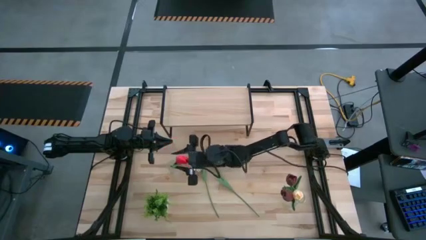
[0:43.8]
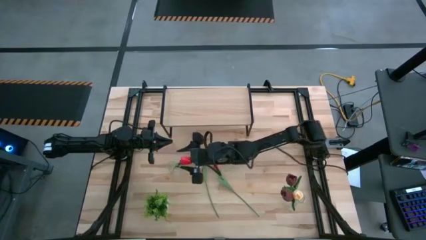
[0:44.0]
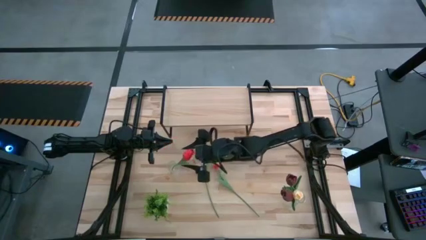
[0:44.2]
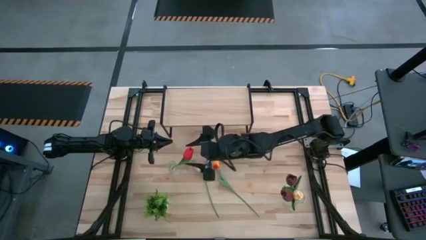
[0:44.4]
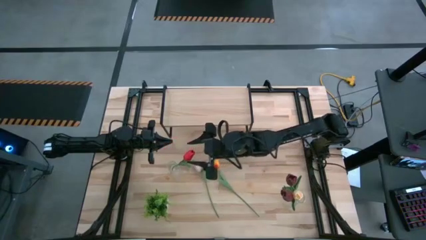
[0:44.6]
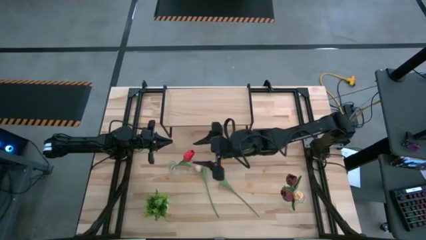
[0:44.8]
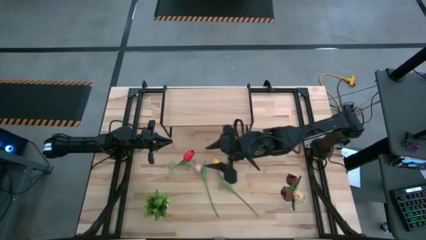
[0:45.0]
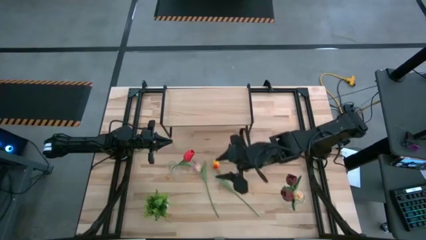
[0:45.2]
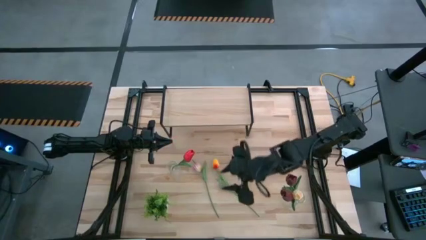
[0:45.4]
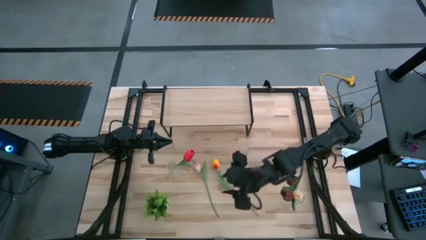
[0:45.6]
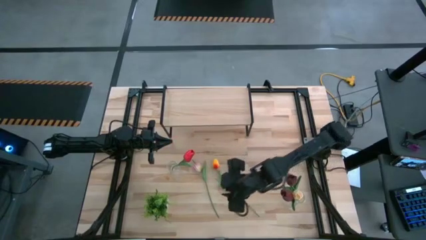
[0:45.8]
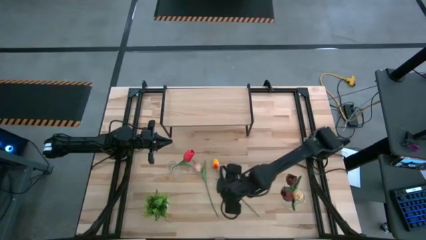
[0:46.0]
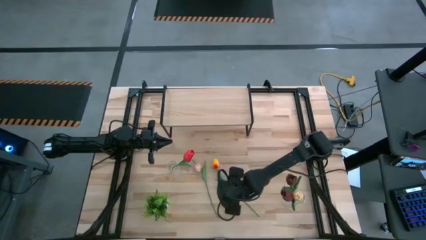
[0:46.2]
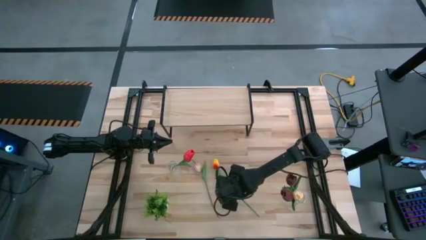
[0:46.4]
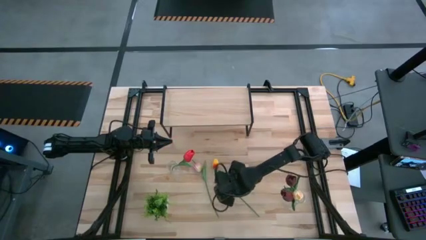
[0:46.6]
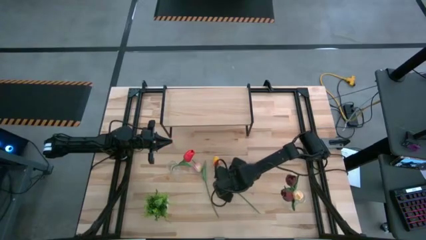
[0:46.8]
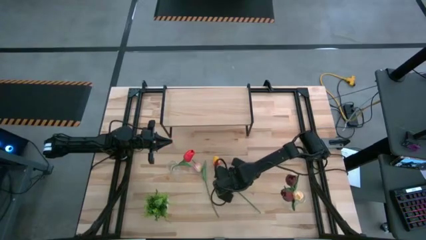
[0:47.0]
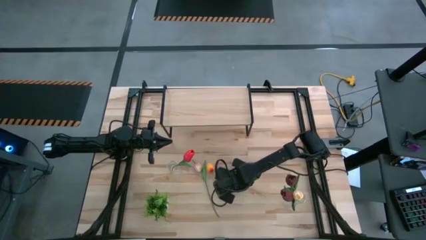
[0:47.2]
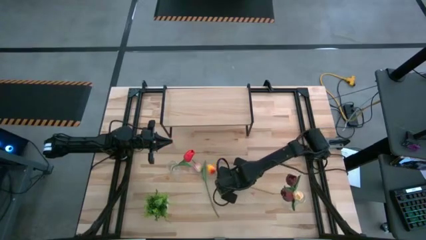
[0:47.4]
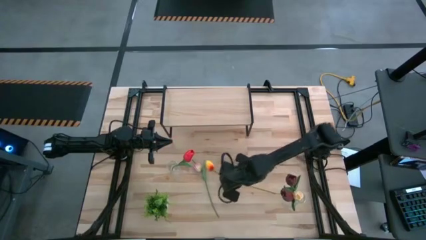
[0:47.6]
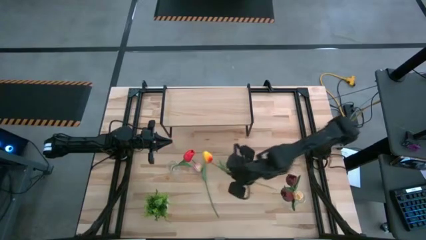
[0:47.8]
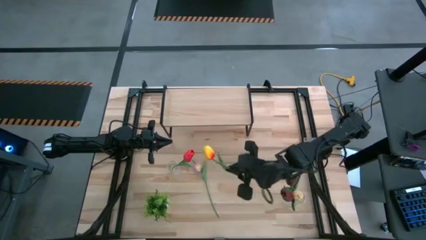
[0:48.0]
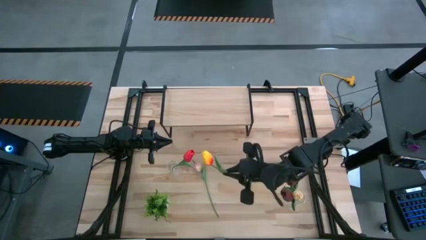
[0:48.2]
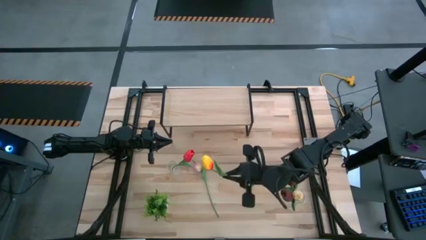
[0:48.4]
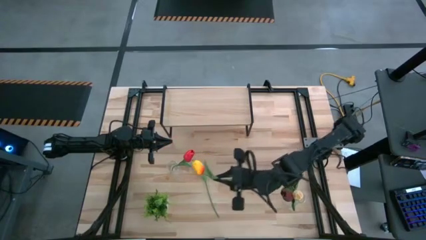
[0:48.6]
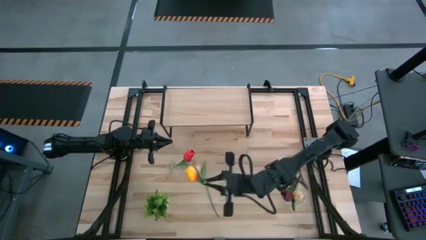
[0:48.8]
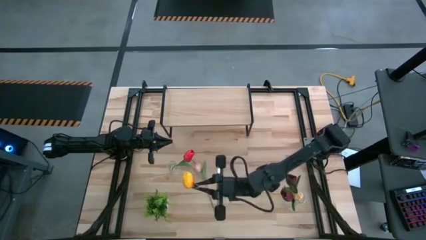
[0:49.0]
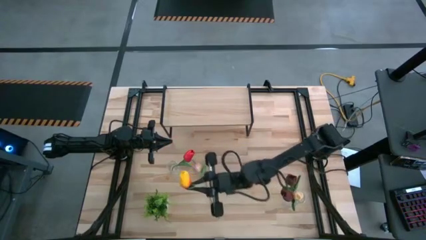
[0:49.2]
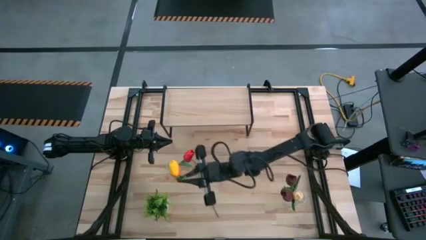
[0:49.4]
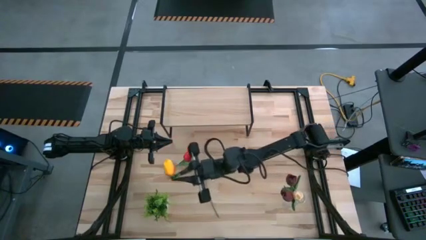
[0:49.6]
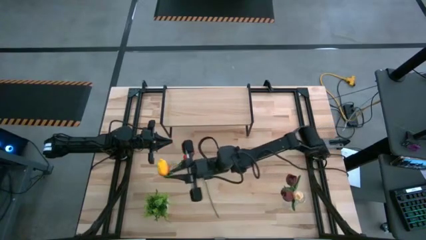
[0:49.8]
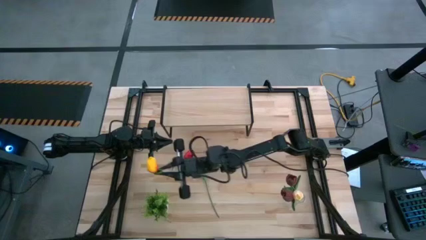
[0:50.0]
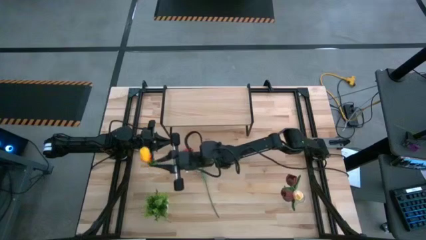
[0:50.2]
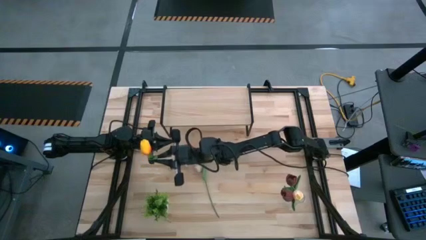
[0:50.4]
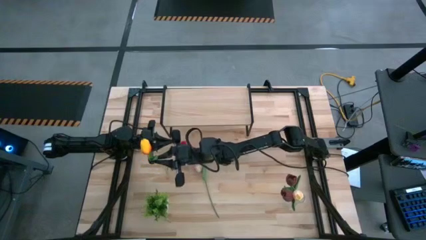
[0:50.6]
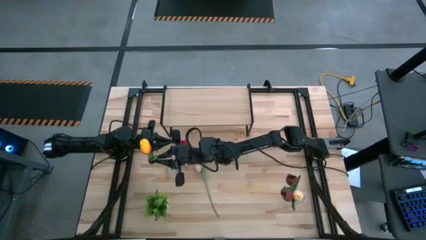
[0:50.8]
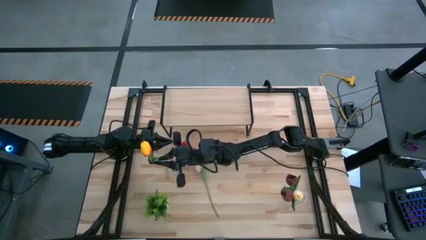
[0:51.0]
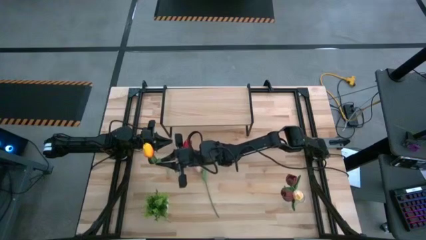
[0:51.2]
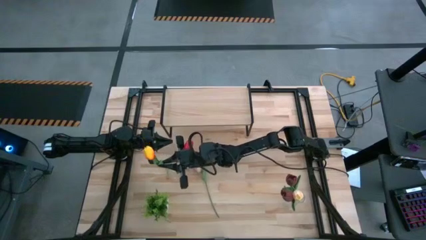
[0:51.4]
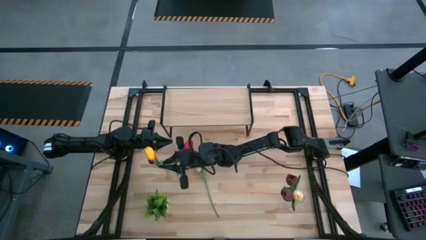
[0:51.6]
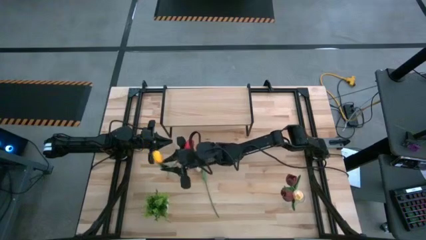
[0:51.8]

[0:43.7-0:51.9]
Task: Pick and place flowers into a vace then onto a shelf
Put the yellow flower into the left transparent flower vase

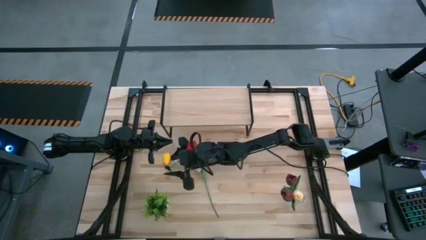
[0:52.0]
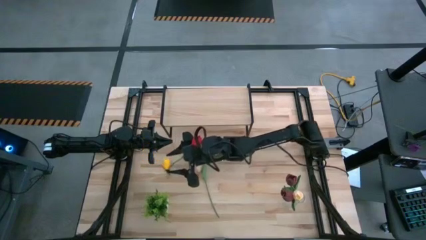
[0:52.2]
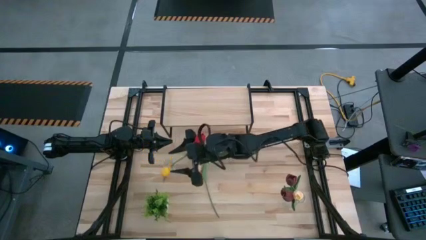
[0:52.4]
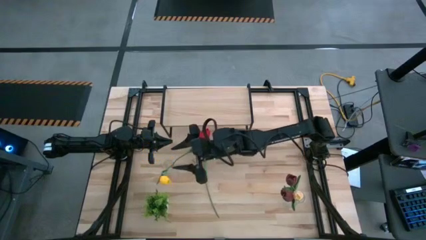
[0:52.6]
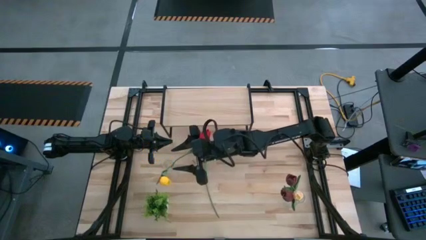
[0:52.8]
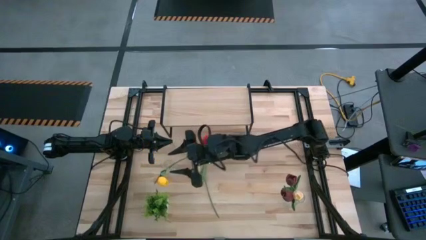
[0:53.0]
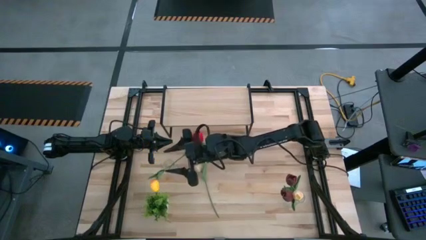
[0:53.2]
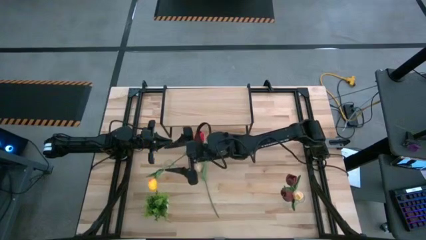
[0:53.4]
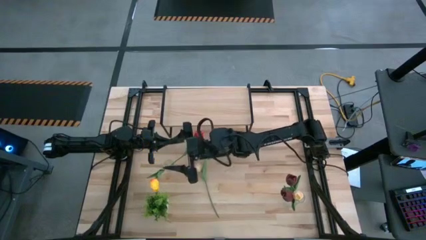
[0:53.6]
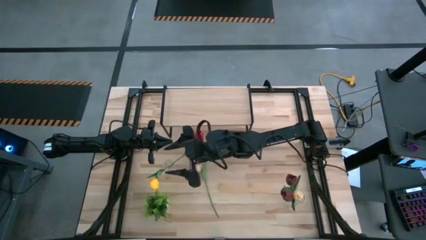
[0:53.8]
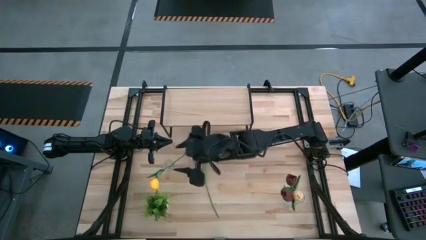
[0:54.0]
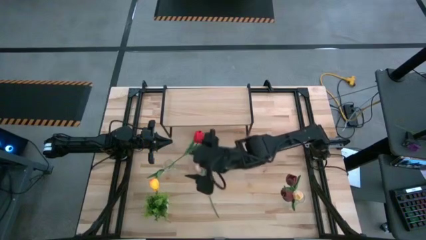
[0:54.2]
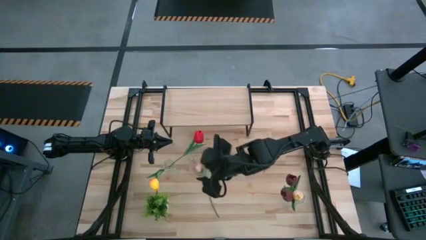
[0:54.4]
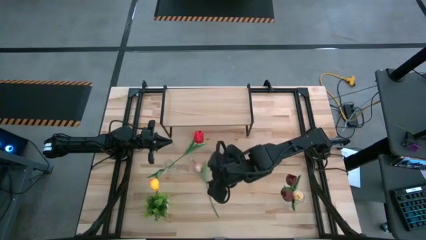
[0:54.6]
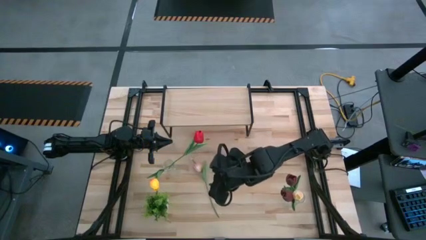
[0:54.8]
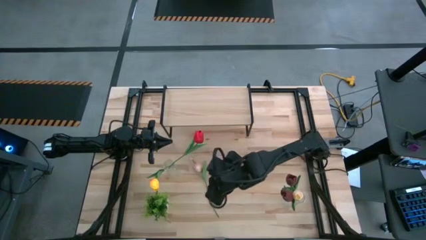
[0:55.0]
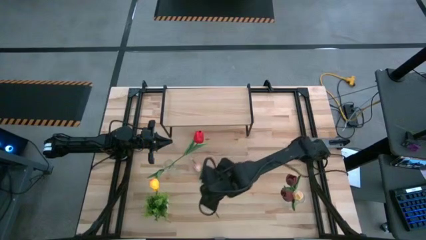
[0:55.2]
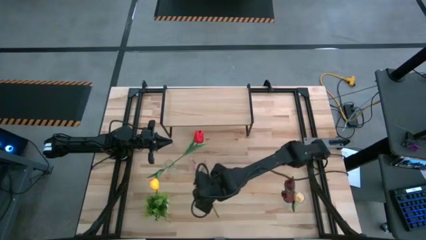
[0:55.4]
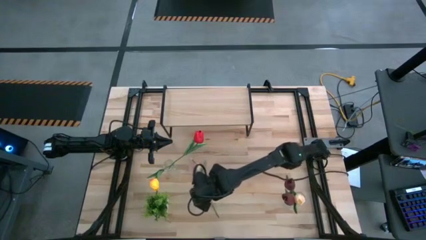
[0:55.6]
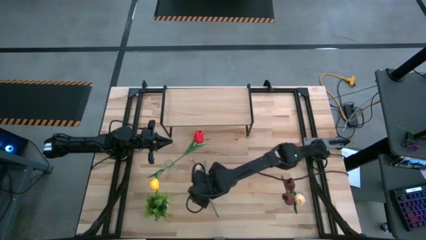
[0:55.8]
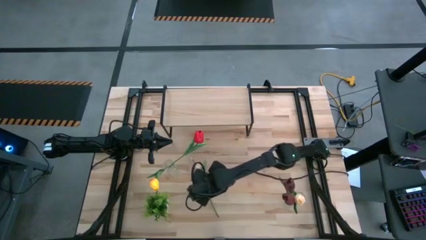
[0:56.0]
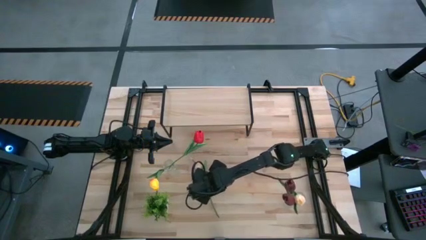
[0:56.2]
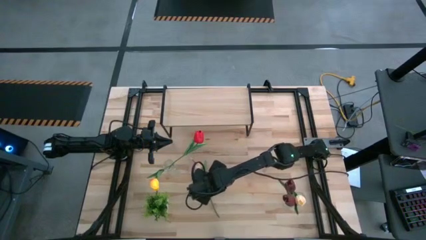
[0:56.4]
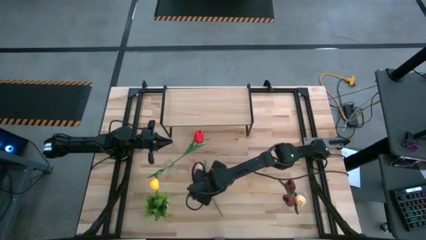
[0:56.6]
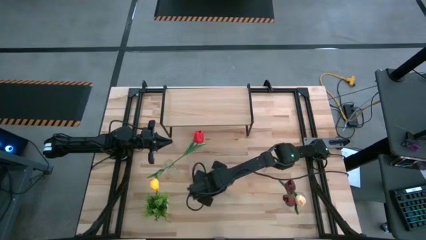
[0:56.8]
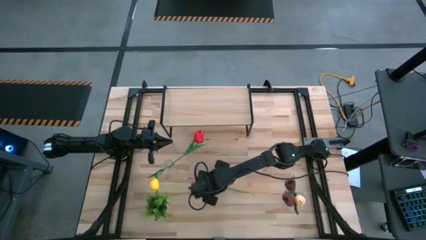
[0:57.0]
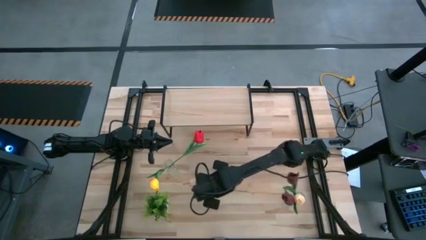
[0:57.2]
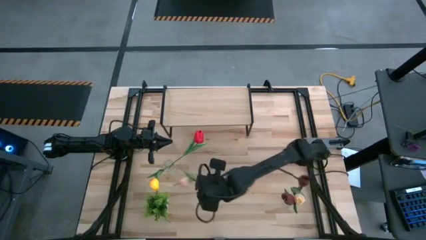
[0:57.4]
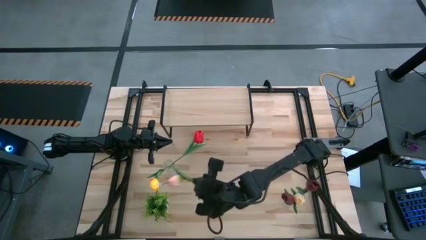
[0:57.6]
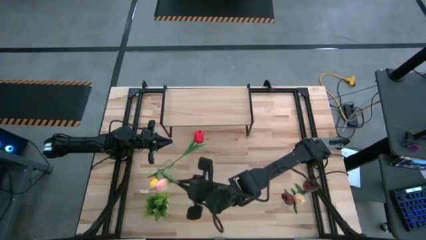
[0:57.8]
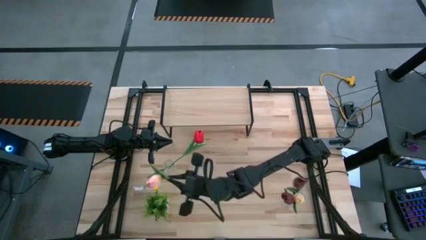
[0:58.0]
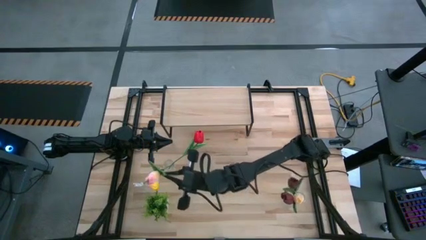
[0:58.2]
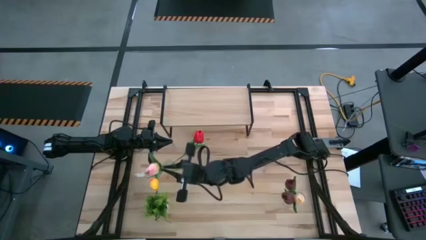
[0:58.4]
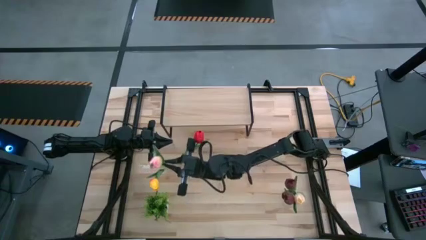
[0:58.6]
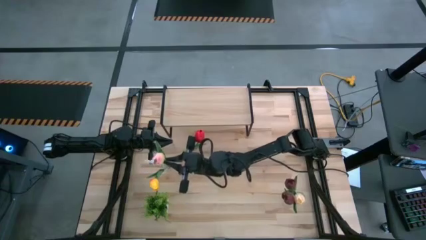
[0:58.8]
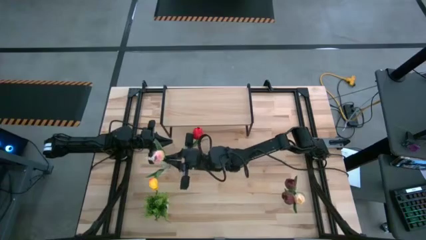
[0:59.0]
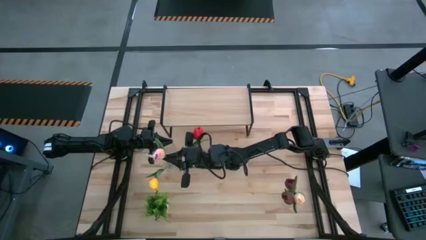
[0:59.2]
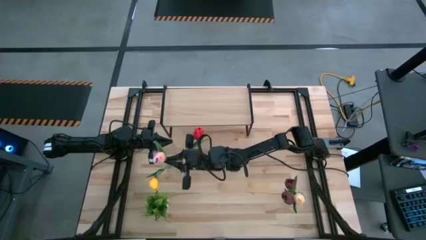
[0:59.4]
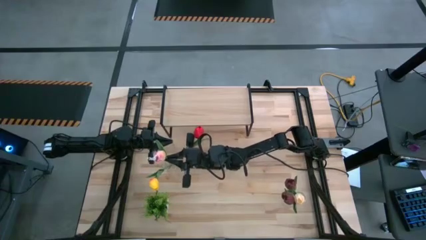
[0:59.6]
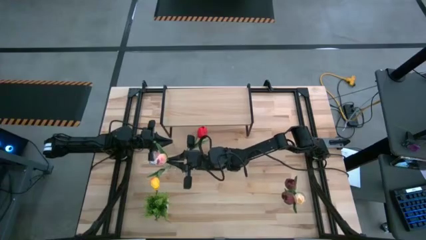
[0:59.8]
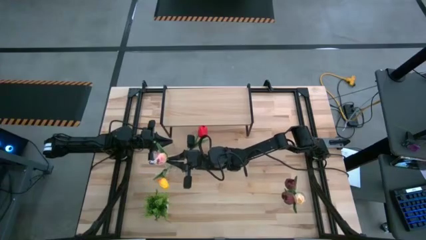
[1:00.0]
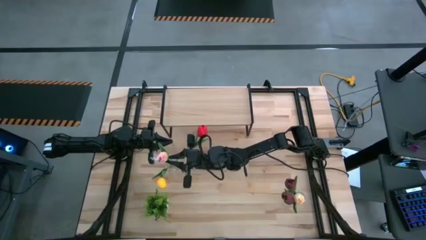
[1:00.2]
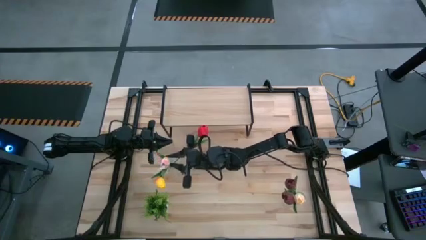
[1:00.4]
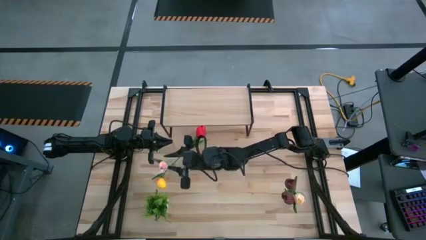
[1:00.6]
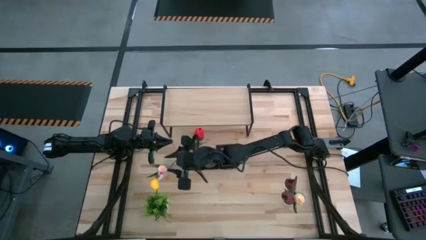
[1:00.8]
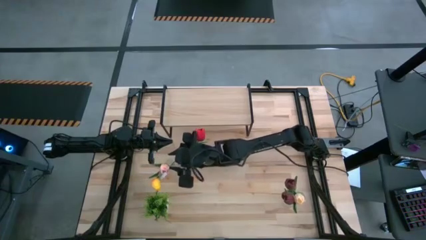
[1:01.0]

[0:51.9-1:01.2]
Put the pink flower into the left transparent flower vase
